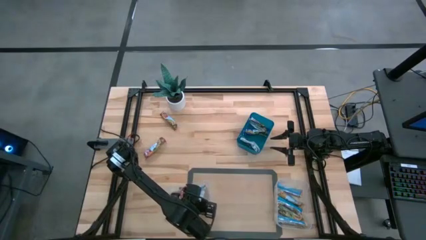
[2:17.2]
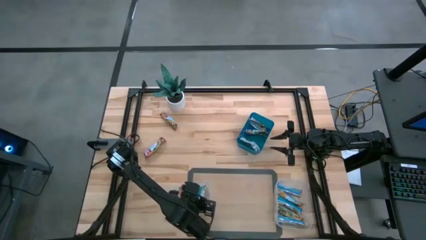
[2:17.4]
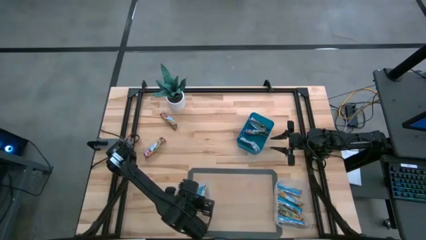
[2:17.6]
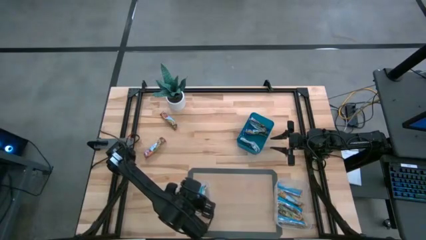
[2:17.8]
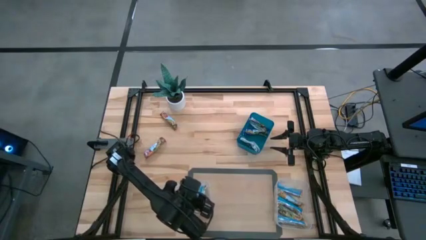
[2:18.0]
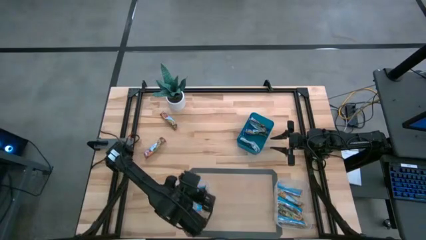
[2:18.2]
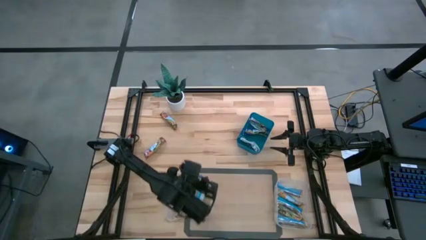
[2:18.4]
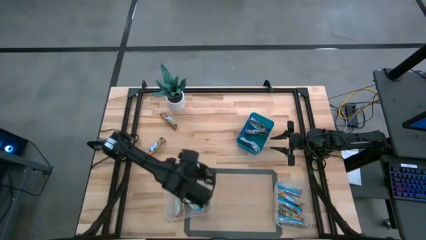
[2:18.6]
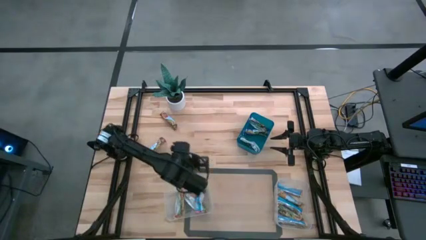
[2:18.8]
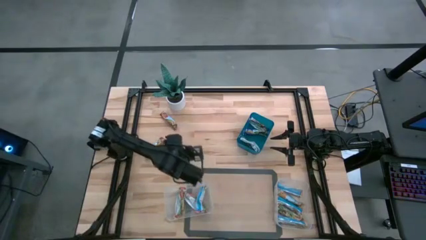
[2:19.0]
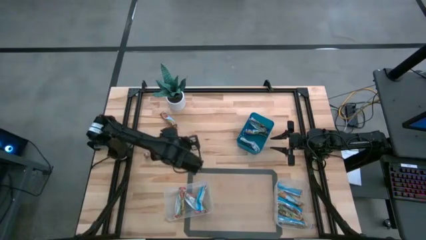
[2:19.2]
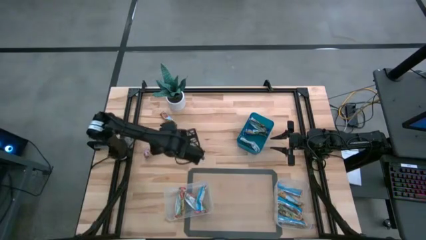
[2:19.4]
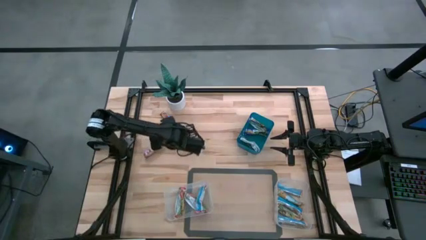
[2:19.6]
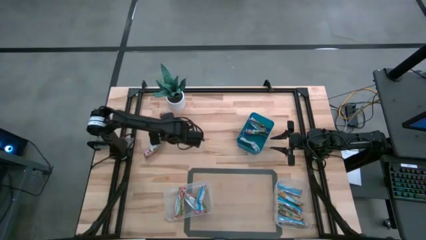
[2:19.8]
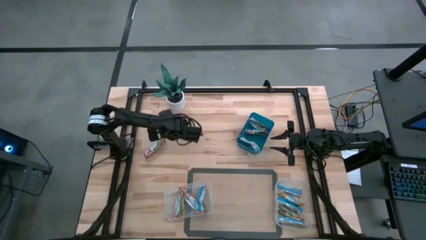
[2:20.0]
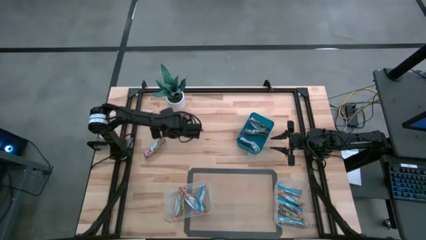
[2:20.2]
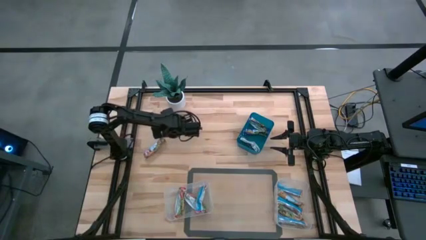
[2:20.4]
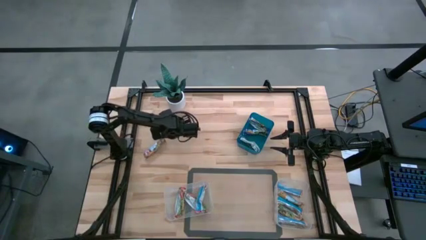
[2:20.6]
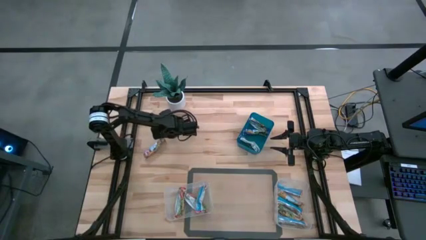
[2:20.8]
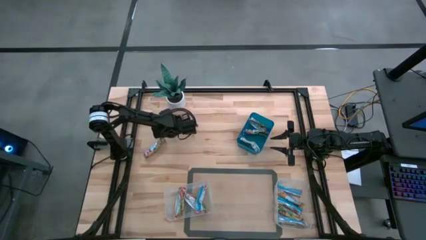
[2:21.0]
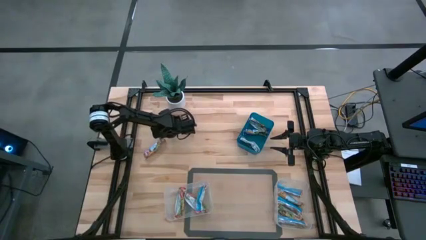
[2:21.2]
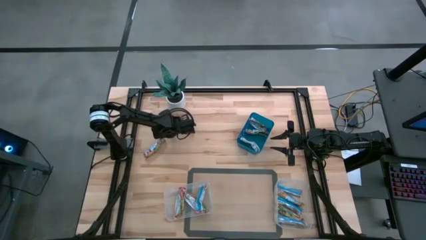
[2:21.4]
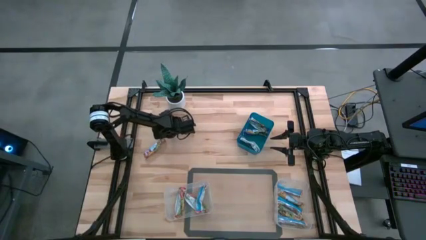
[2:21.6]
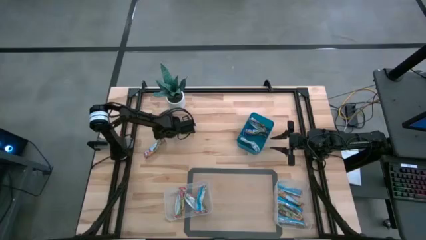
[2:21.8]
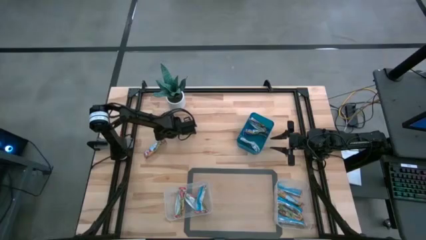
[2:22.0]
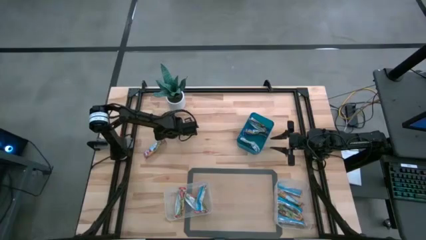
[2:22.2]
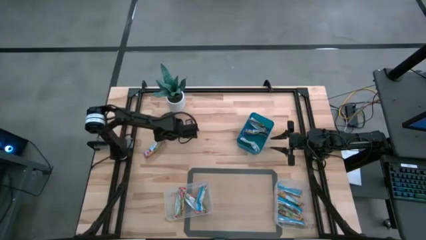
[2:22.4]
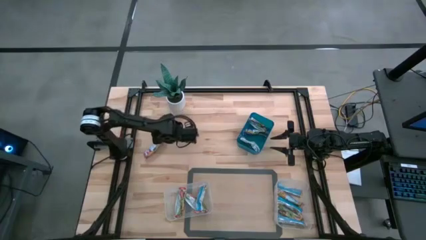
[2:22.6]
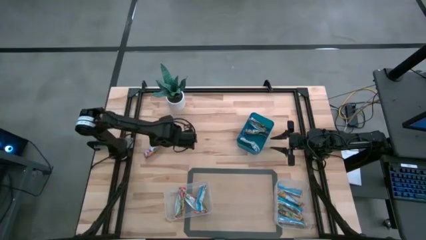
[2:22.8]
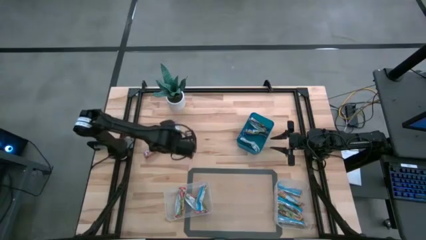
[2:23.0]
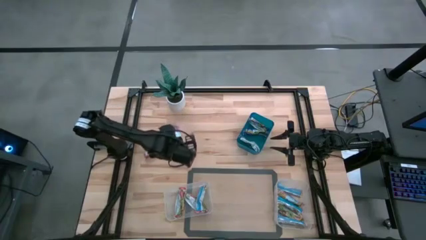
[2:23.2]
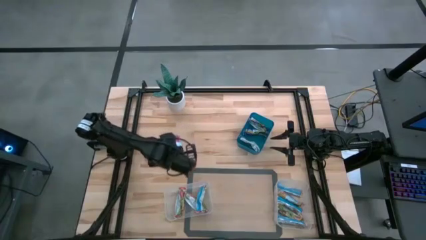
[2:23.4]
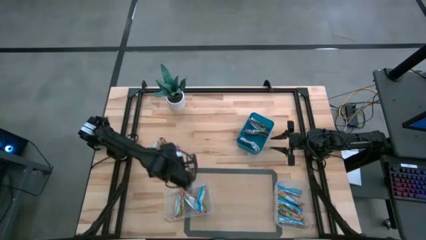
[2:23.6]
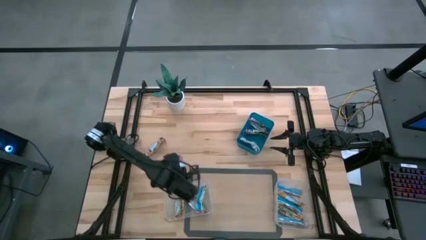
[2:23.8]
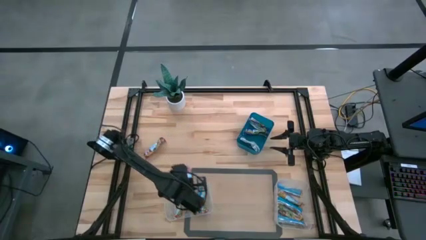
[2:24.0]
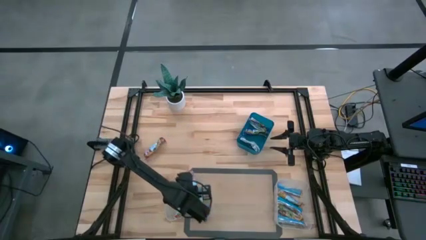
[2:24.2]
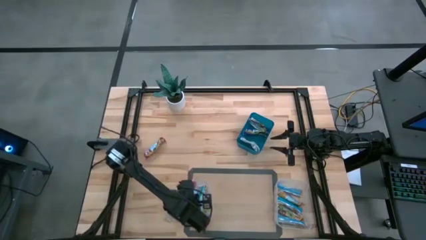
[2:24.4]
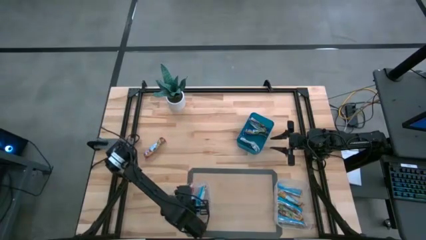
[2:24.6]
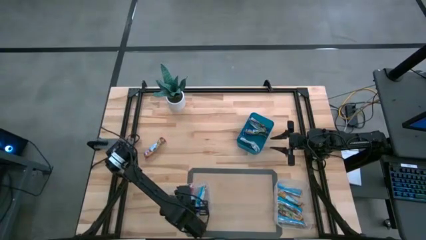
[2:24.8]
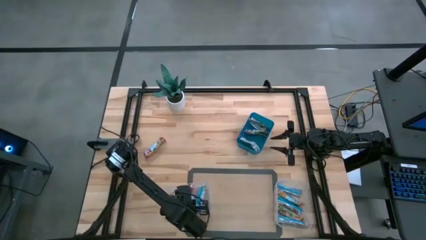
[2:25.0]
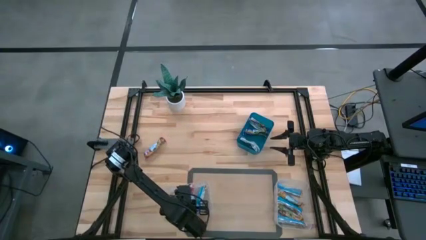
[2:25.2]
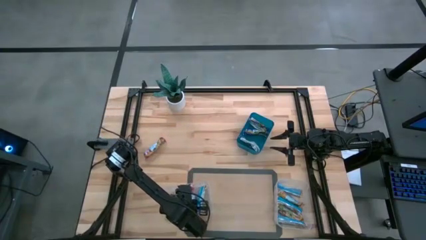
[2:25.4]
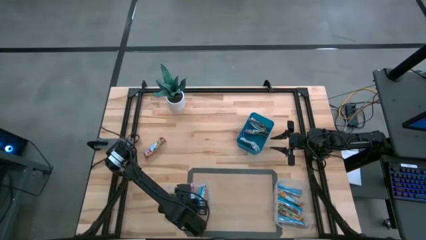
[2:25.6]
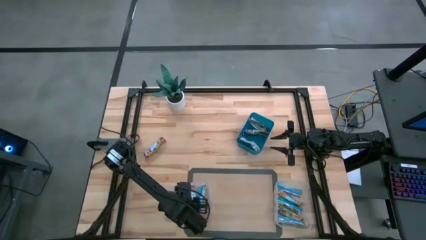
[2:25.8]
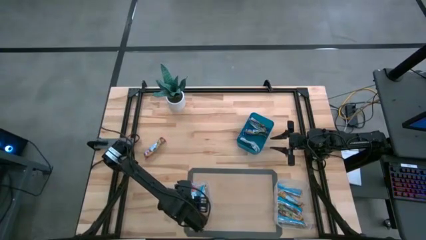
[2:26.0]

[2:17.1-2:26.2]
Task: Pick and place Granola Bars by type
Put the top red granola bar into the left transparent bin

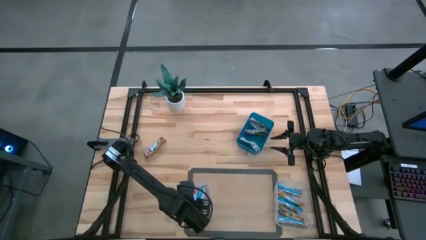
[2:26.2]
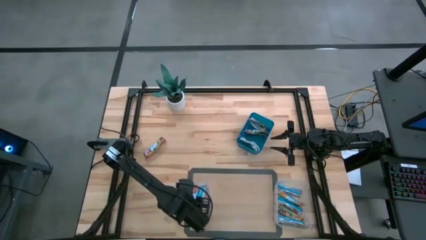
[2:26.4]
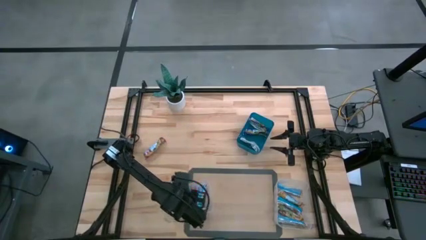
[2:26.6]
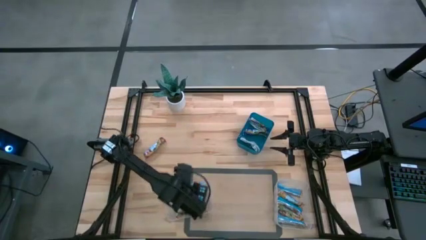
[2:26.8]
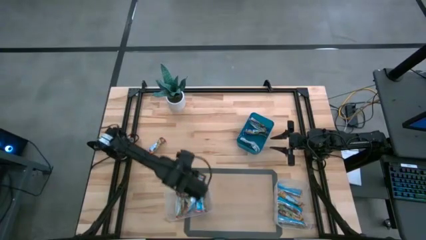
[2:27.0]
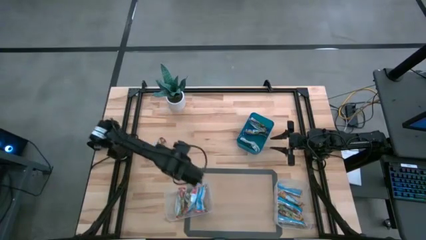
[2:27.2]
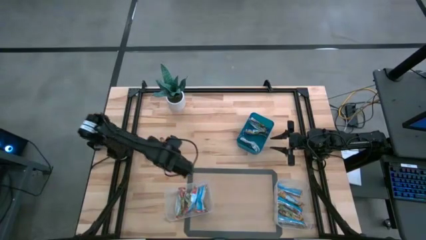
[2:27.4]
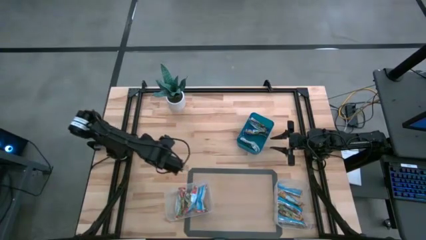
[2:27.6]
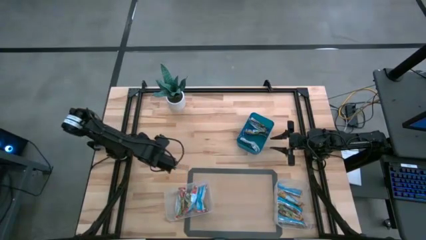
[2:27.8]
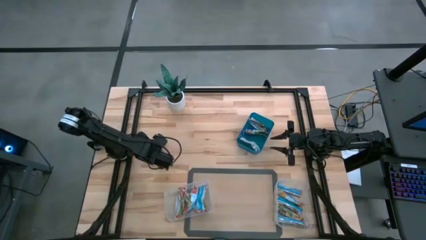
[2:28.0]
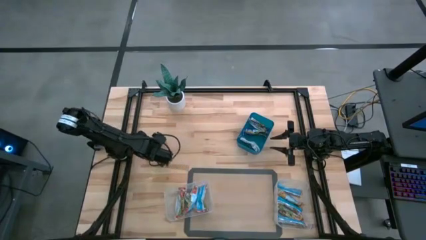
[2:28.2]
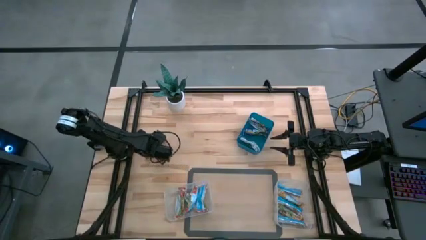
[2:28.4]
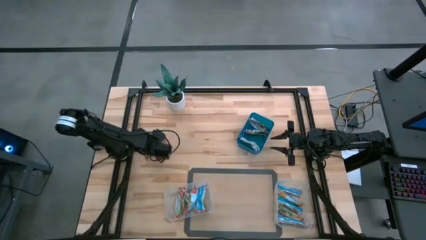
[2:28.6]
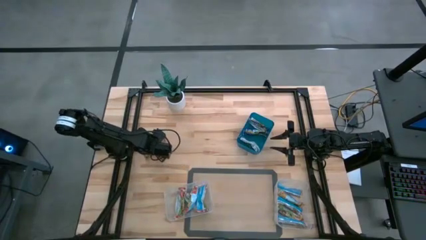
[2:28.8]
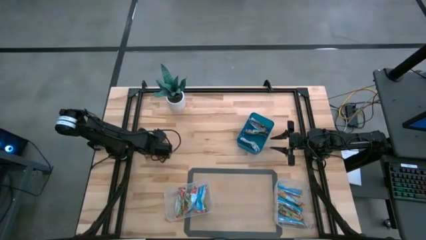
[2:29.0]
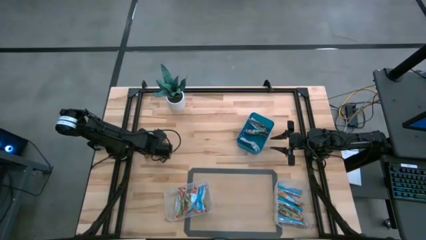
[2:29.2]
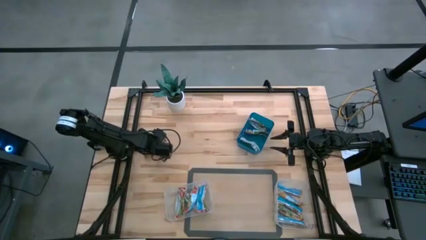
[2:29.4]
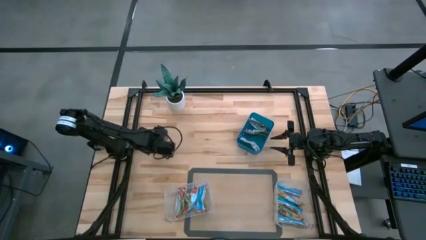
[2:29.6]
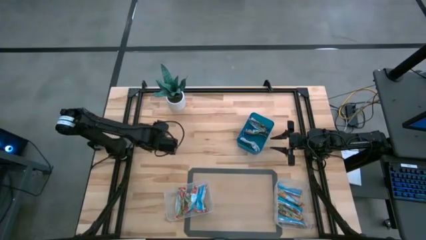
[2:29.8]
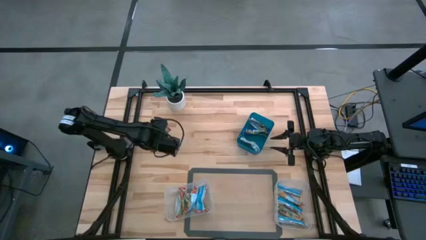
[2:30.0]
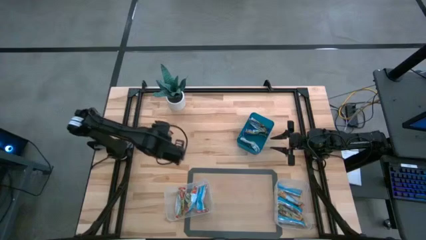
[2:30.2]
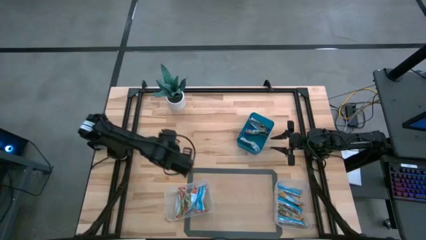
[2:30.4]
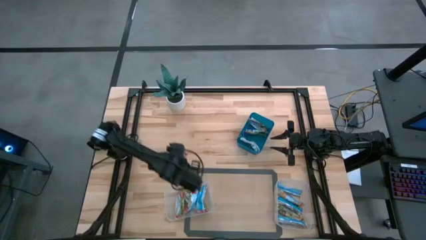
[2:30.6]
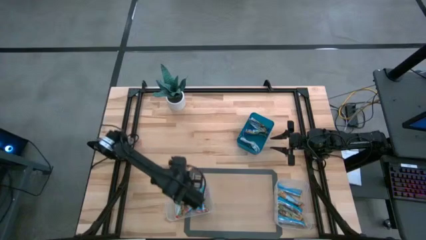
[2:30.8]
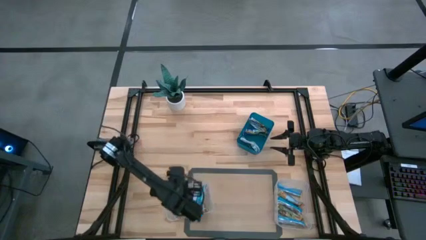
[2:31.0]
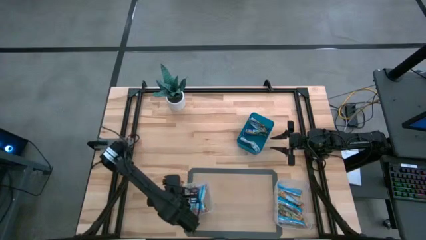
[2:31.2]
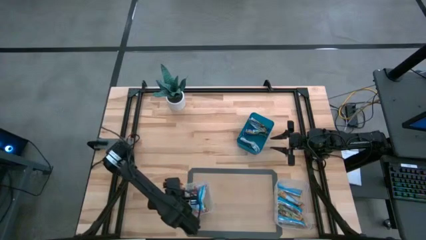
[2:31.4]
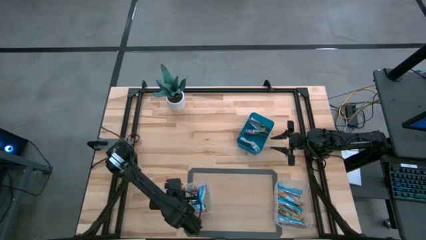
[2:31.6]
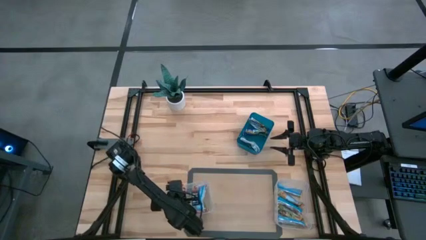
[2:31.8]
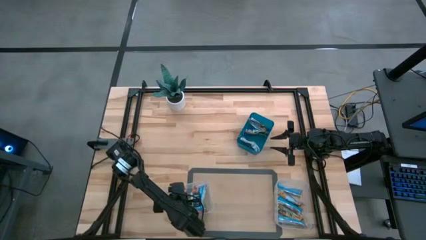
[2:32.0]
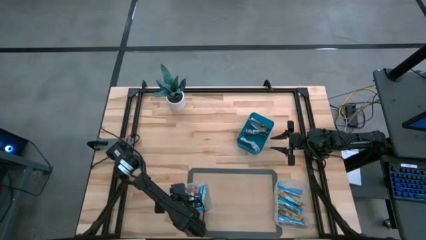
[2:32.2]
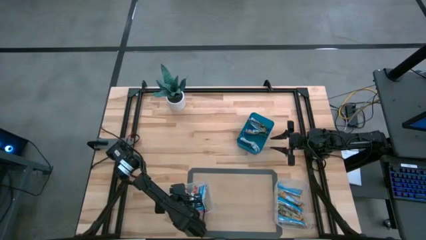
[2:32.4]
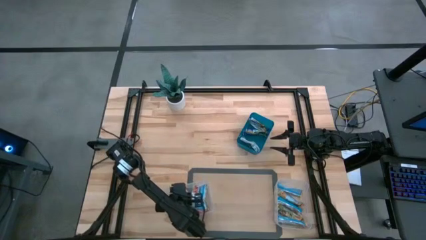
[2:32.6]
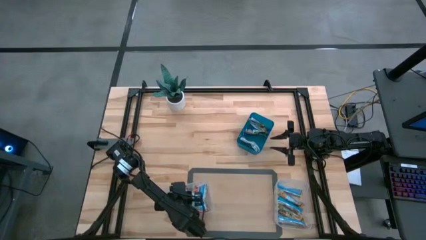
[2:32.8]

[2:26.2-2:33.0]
Put the red granola bar into the left transparent bin

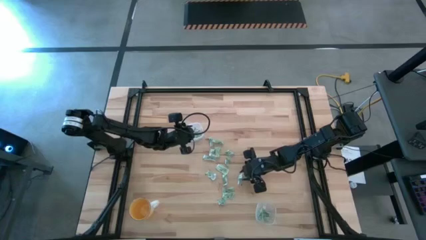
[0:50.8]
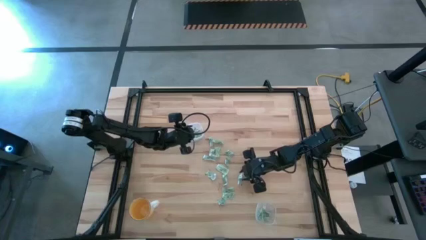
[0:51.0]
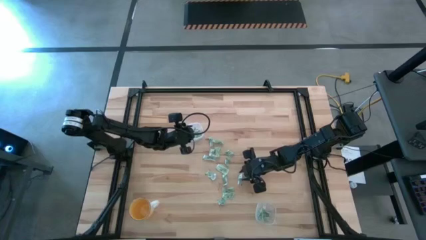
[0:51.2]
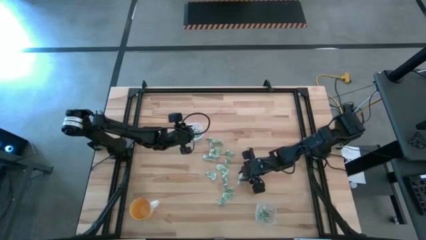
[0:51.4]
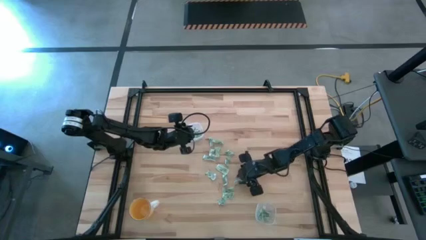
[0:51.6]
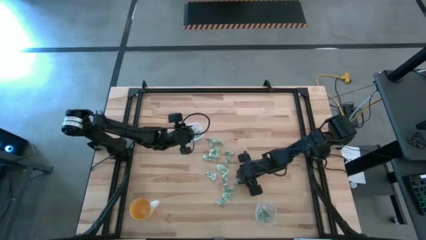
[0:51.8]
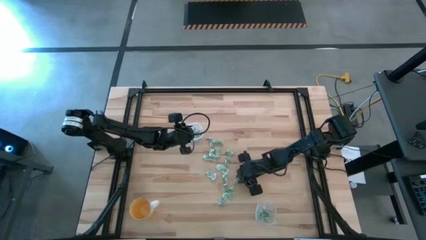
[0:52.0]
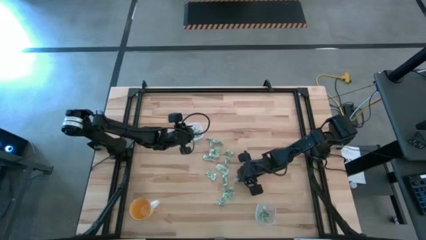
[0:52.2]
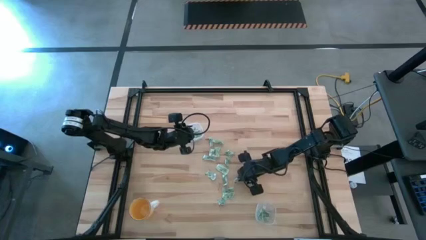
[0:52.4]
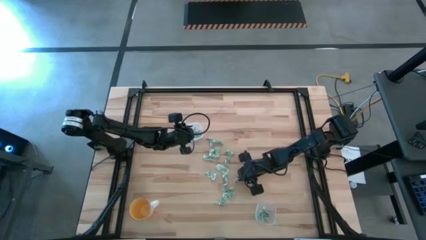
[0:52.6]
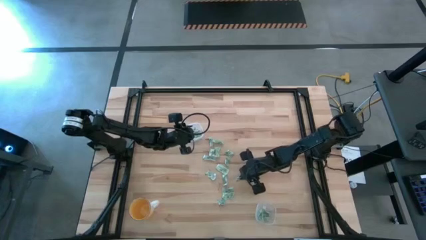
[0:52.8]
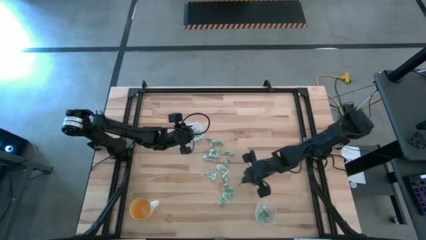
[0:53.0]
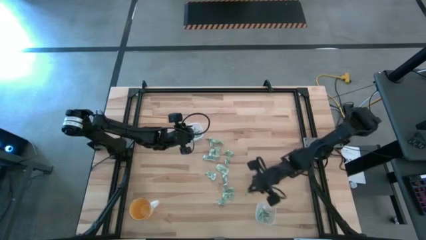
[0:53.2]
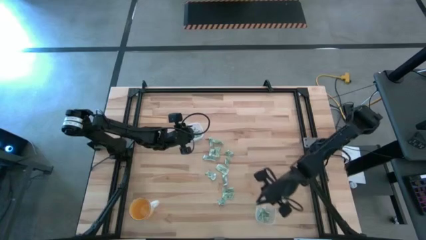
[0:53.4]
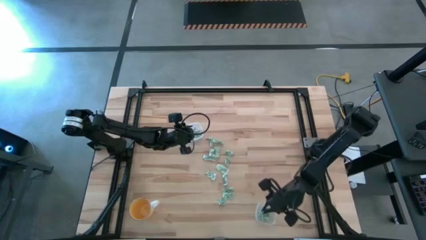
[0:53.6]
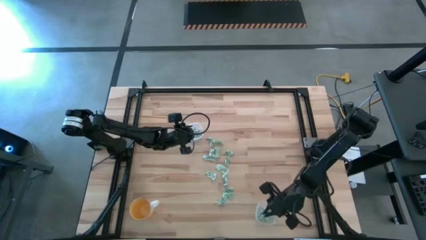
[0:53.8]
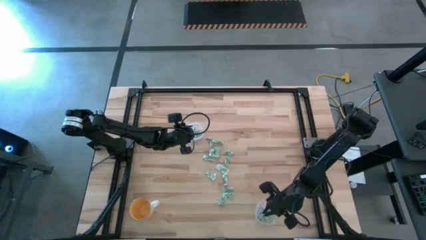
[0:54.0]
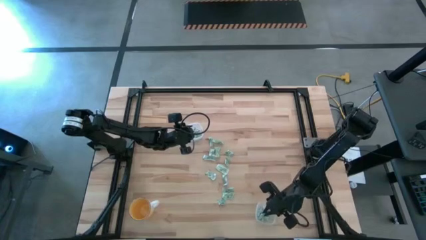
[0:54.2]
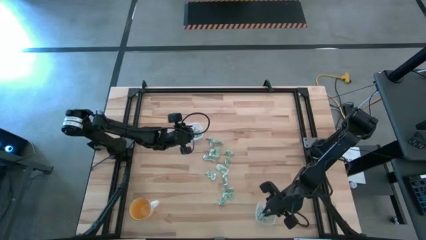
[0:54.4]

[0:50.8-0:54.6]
Task: Pick and place Stevia / Truvia into bins
Put the stevia packet into the bottom transparent container
